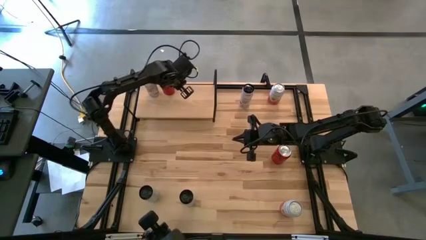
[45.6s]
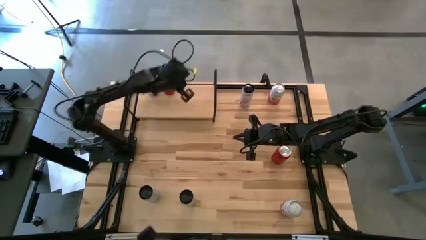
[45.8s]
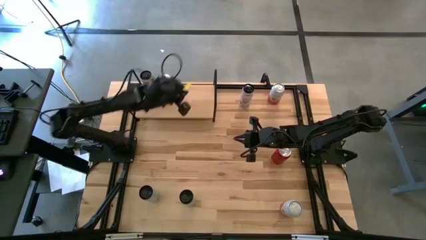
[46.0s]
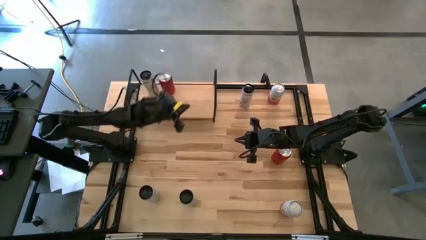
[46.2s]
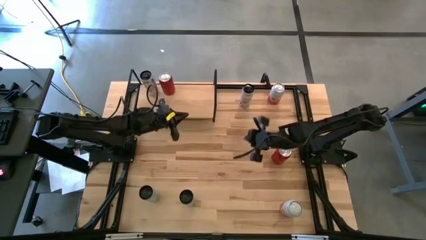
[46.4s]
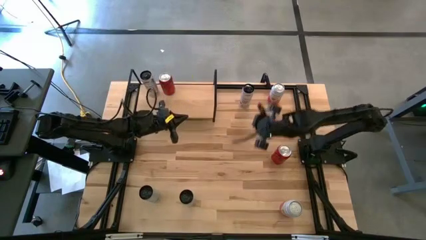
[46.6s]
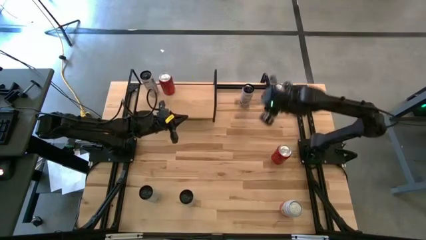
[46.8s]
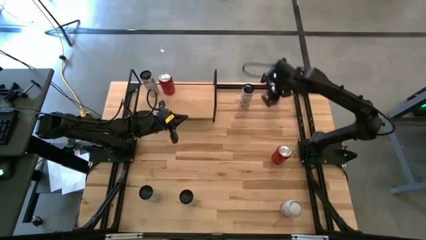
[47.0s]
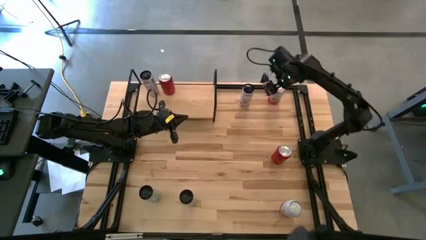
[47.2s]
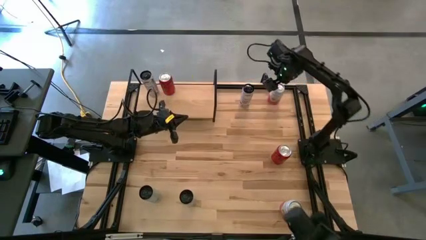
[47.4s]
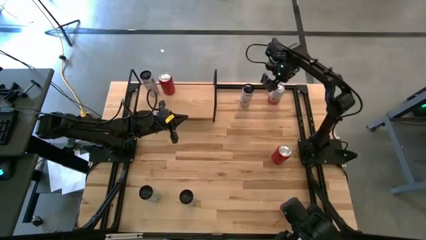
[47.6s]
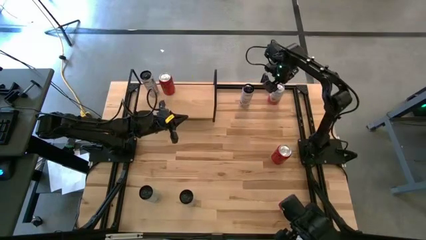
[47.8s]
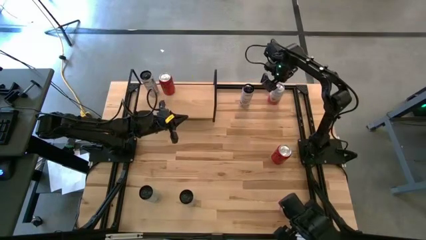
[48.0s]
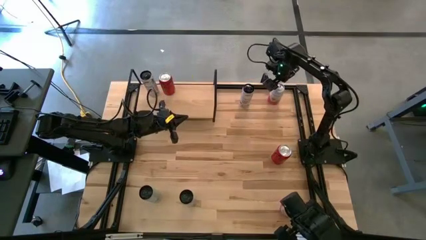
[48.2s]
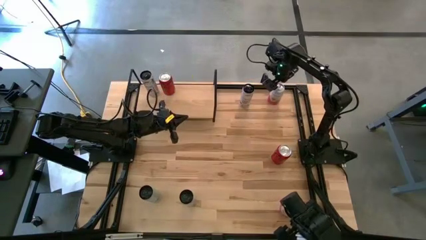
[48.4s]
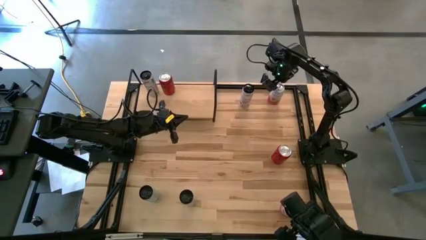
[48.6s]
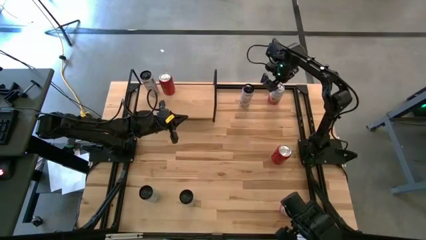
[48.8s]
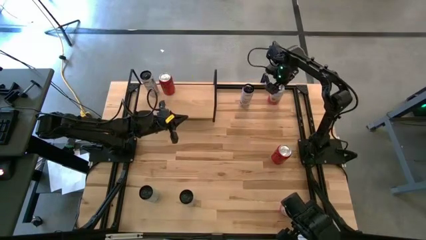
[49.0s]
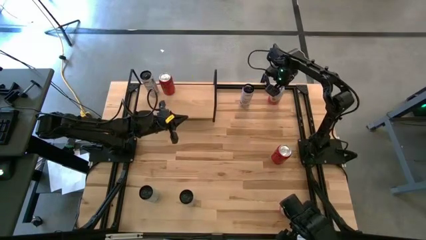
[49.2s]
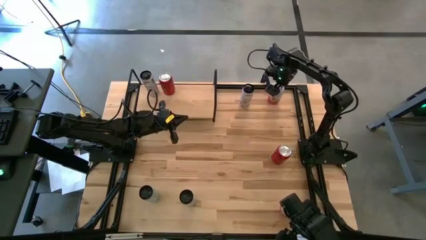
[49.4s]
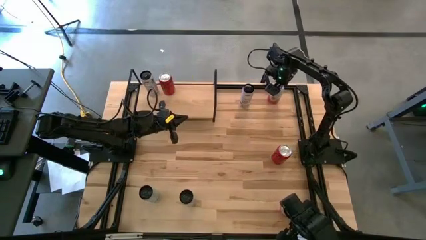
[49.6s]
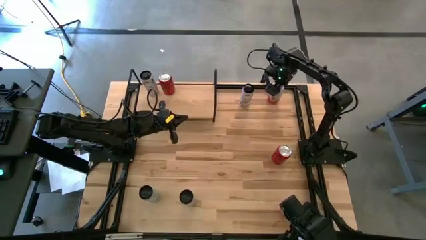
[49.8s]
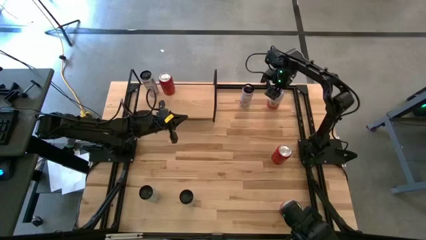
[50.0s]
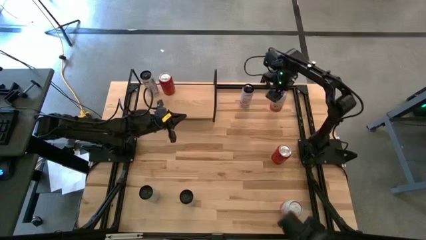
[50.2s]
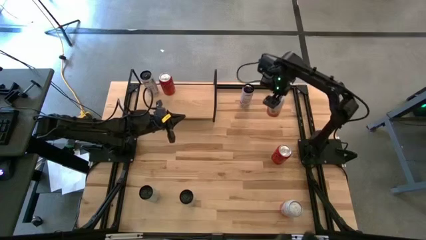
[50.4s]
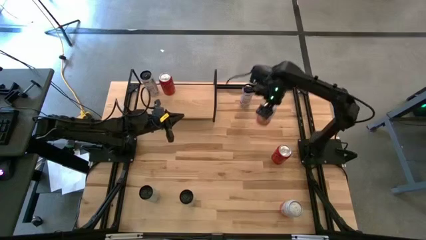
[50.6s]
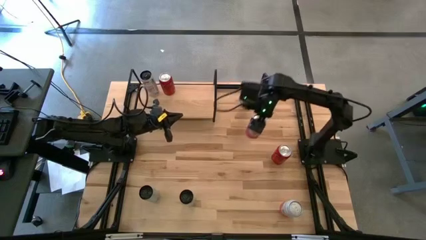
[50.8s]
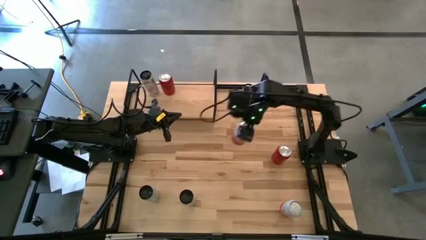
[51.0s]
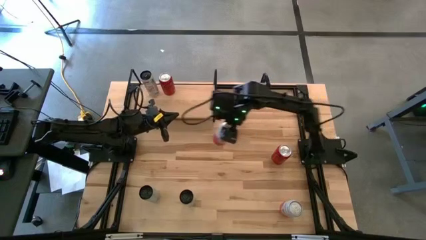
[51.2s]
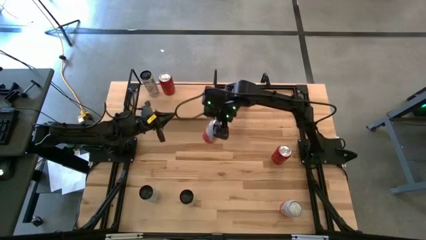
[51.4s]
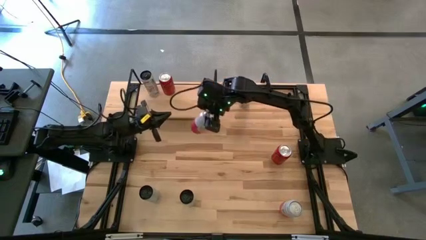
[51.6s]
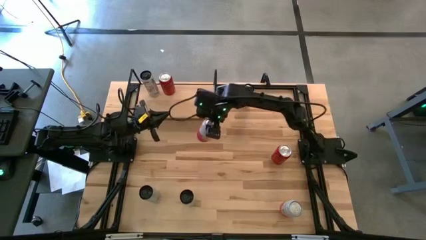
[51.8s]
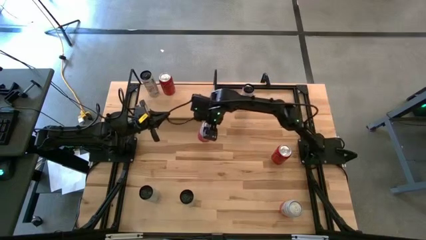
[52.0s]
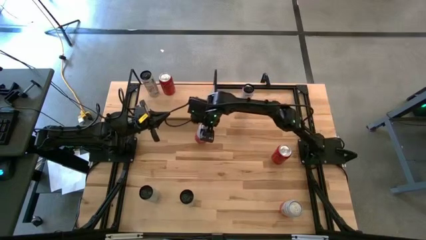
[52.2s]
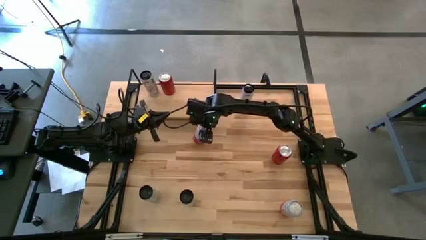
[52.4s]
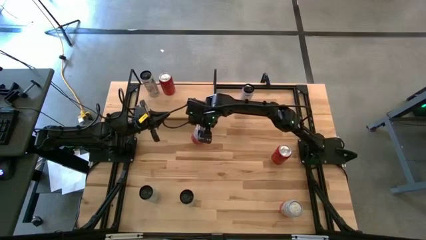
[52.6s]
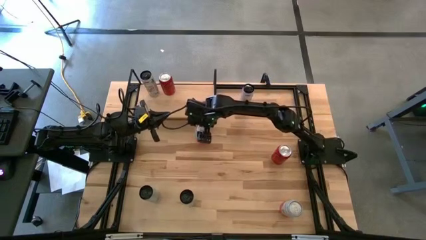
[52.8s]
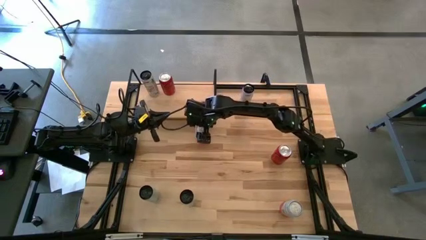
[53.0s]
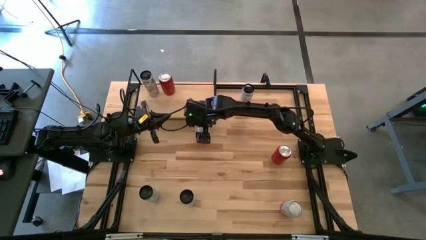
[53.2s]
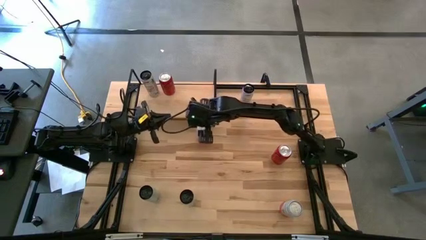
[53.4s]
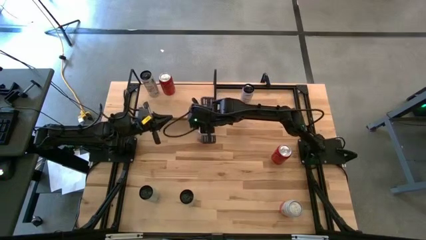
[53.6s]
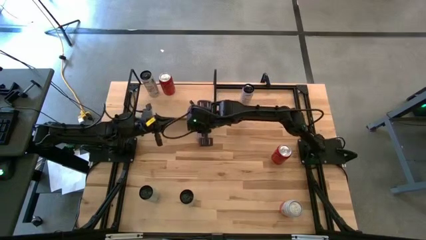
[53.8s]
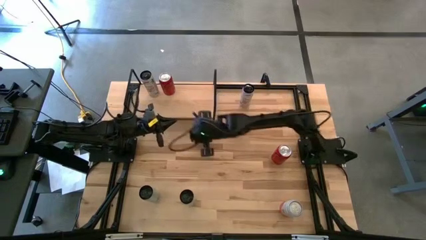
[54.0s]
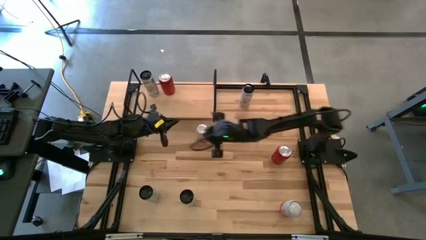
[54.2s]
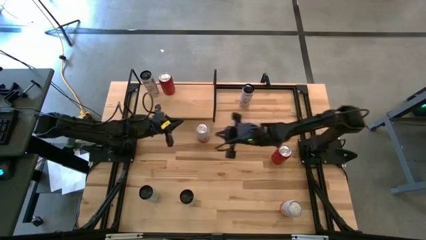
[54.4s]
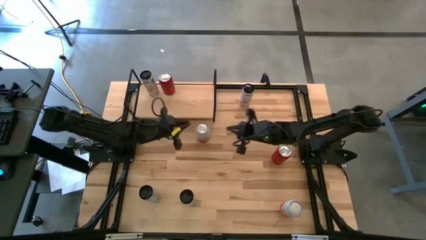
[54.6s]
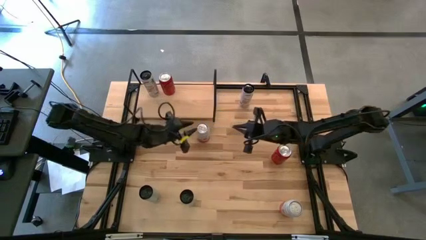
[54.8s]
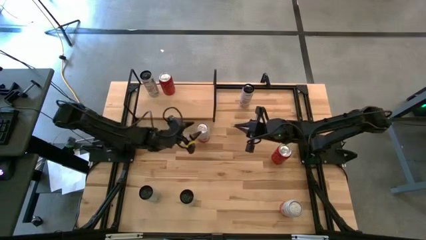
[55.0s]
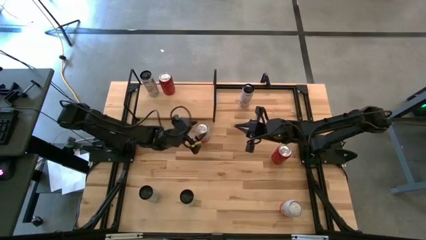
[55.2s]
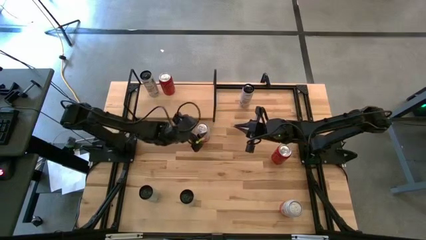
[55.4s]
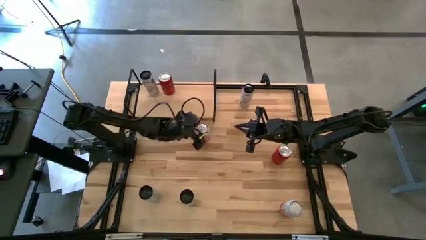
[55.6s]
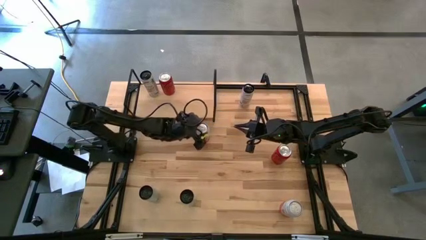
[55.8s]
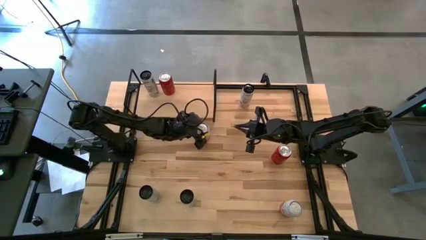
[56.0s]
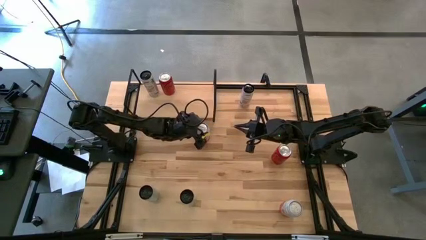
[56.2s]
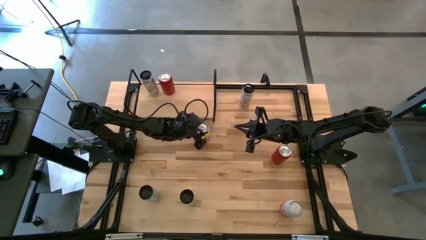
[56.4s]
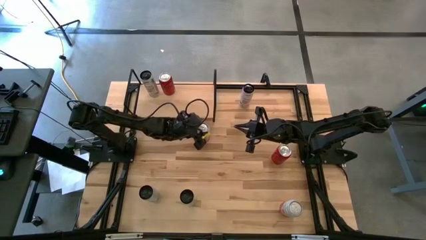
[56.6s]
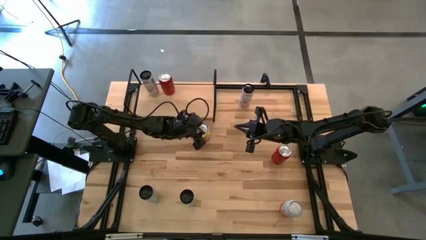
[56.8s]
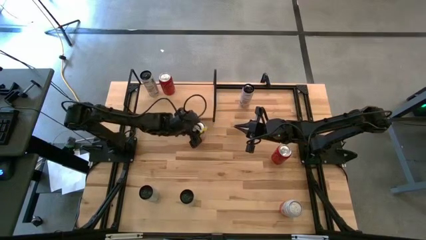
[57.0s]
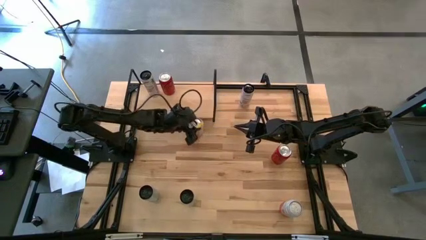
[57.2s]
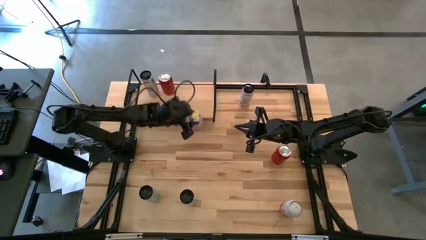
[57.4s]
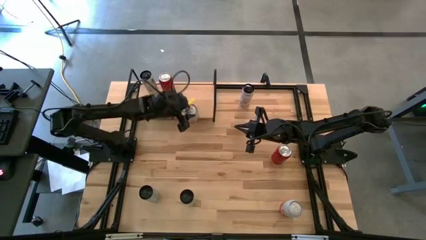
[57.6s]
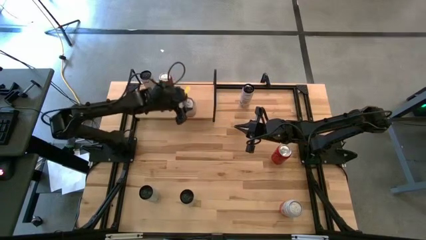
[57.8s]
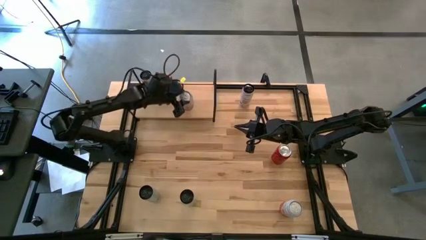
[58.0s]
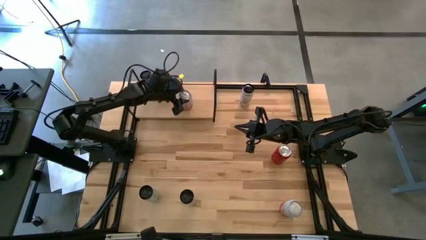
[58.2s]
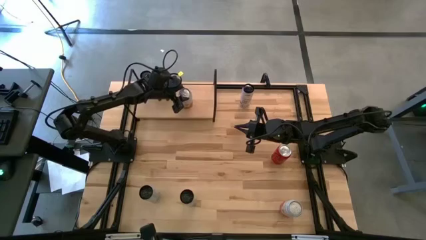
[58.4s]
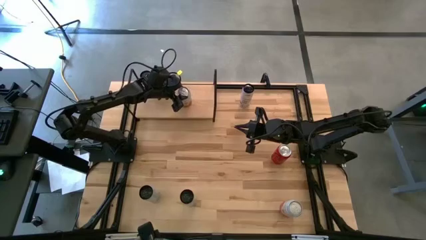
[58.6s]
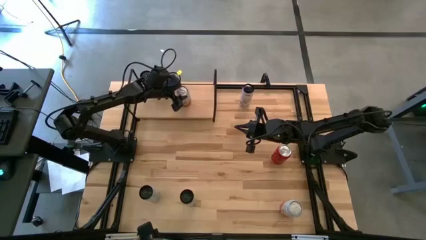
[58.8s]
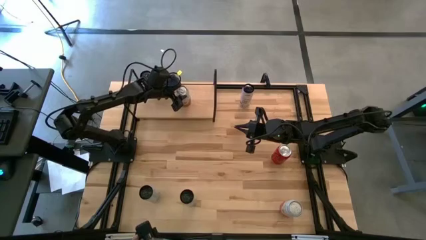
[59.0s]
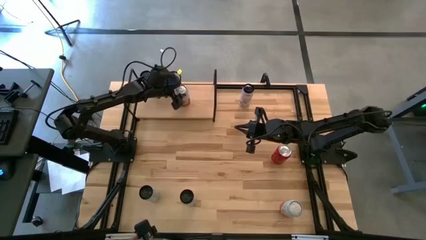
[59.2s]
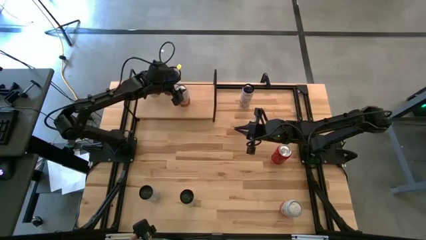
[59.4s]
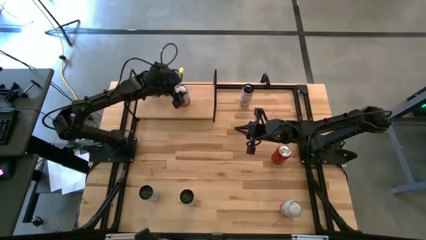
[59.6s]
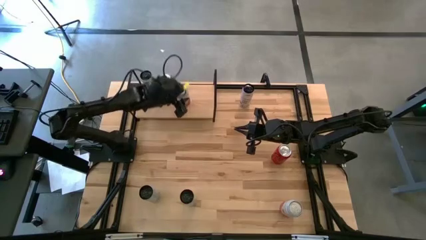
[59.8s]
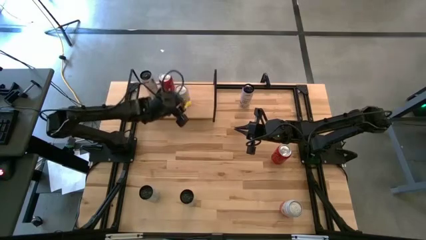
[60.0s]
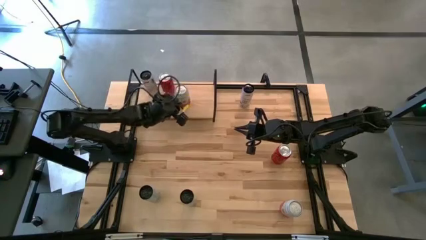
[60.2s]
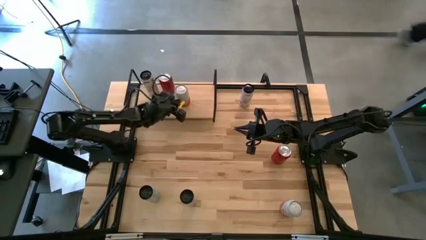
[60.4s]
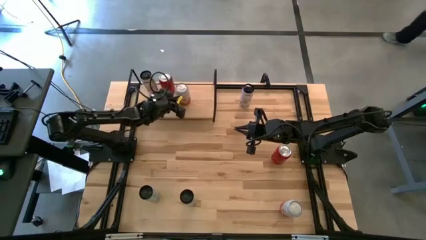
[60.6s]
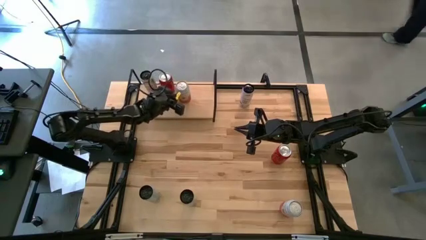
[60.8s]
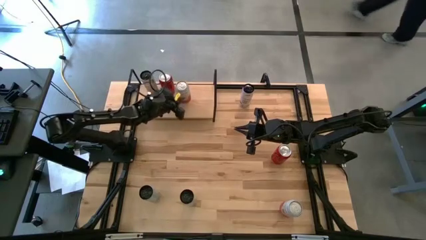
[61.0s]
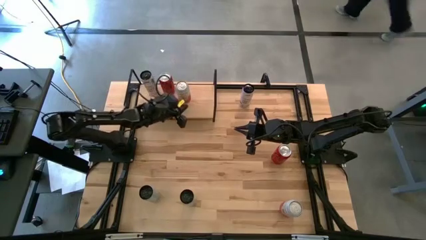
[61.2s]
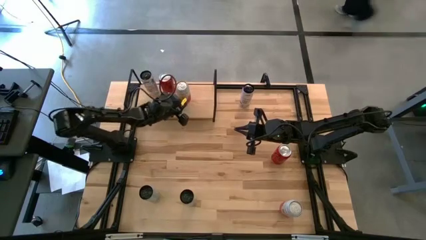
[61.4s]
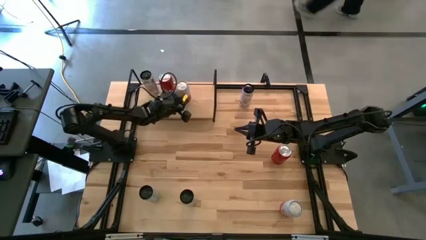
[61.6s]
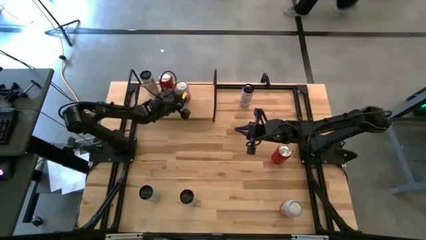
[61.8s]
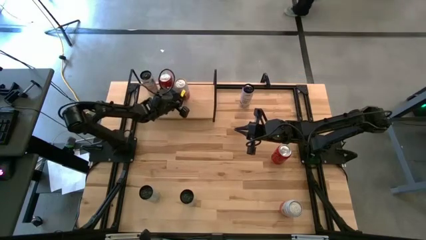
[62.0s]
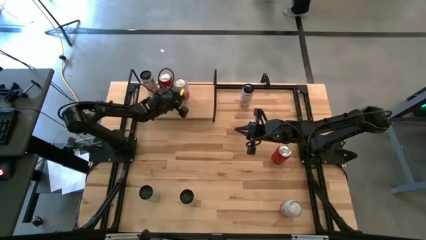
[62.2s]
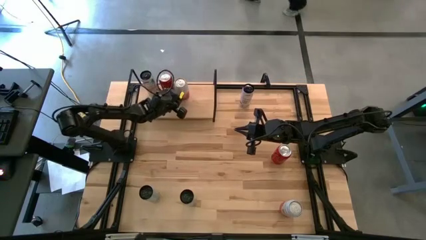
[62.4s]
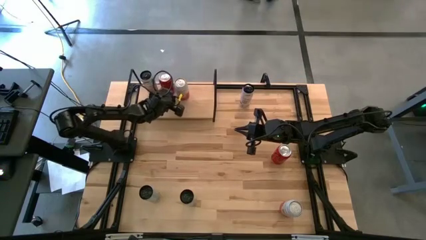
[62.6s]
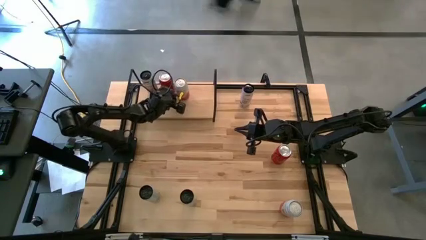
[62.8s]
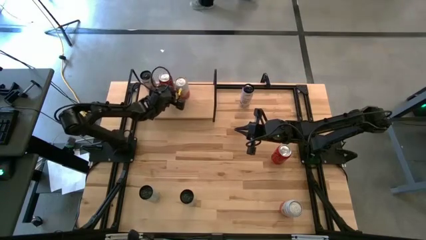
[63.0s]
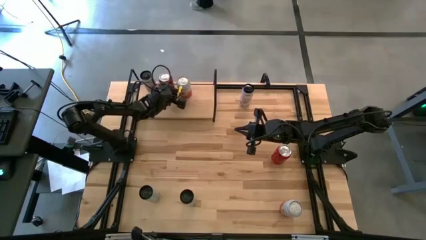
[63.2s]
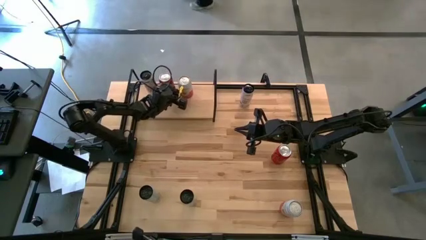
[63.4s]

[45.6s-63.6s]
Task: Place canned beverage on shelf
Put the top pink-white soda can on the shelf
